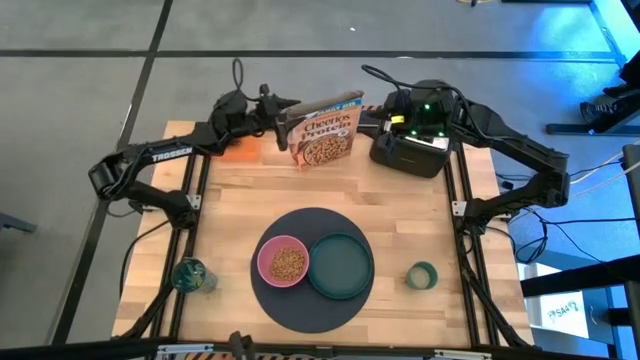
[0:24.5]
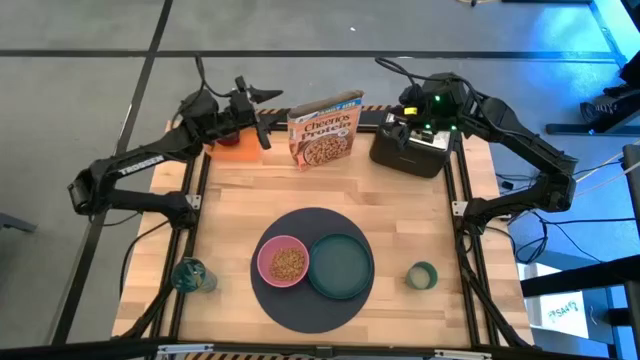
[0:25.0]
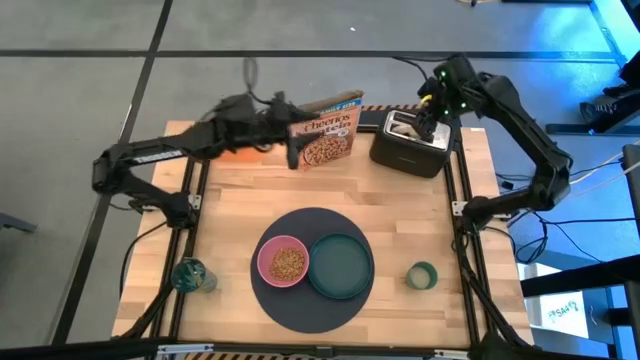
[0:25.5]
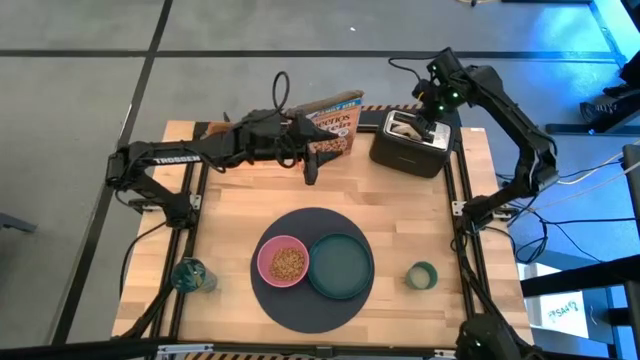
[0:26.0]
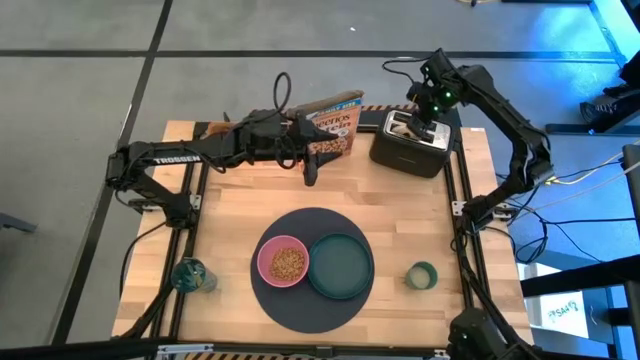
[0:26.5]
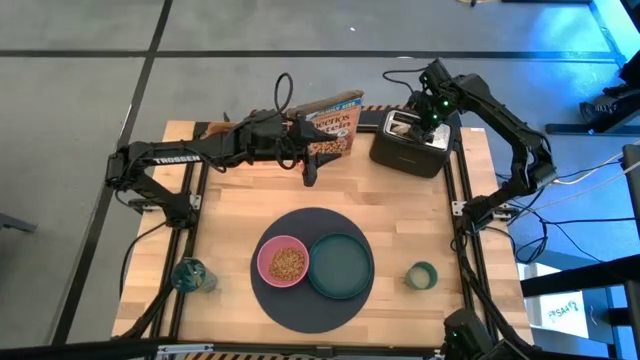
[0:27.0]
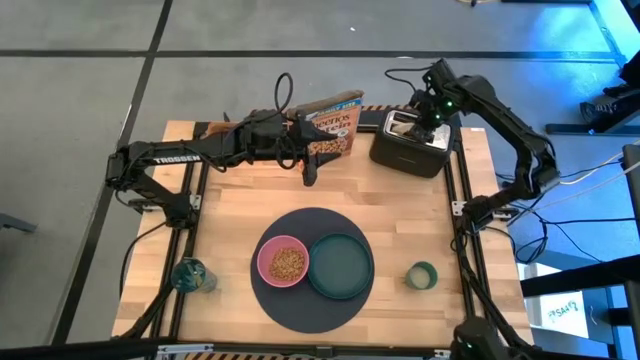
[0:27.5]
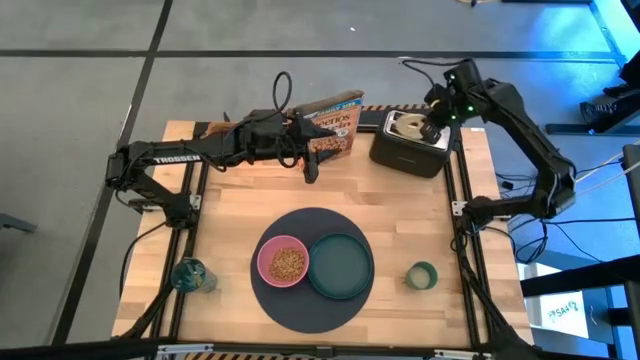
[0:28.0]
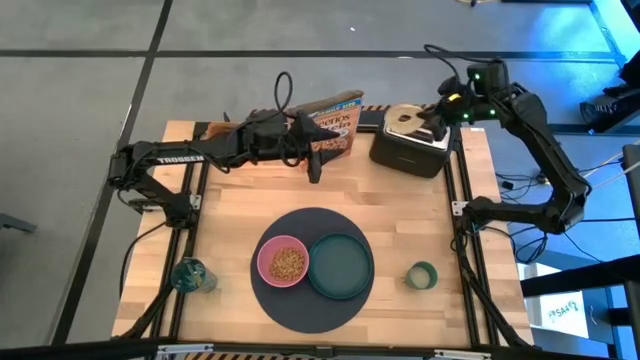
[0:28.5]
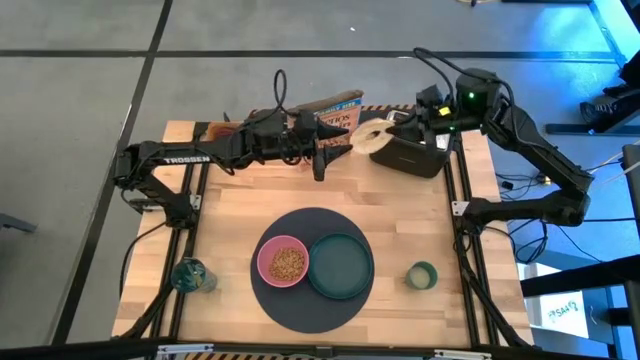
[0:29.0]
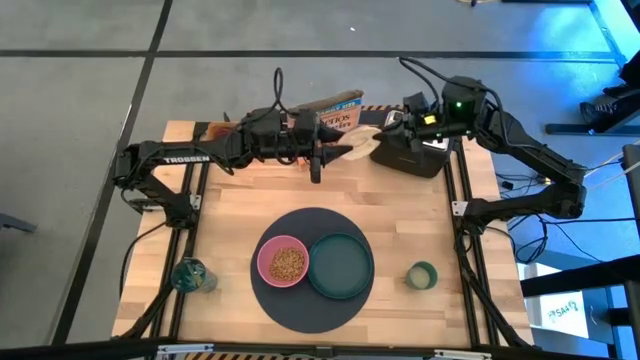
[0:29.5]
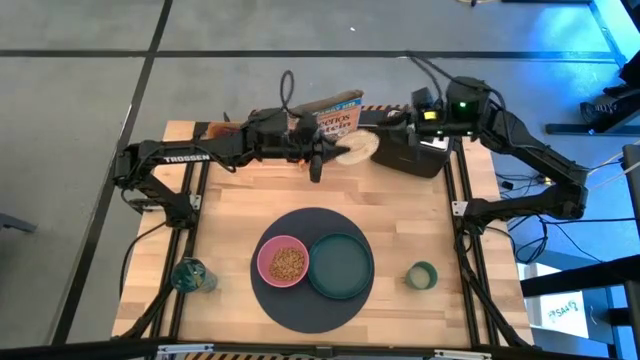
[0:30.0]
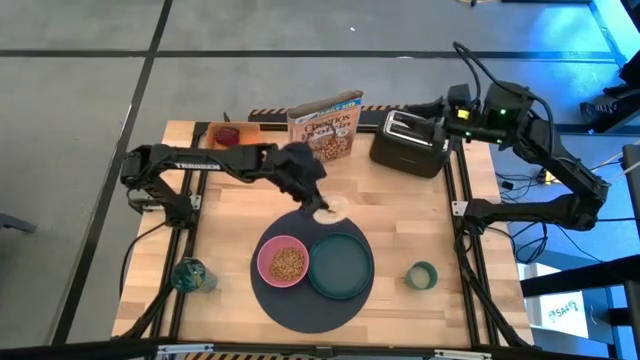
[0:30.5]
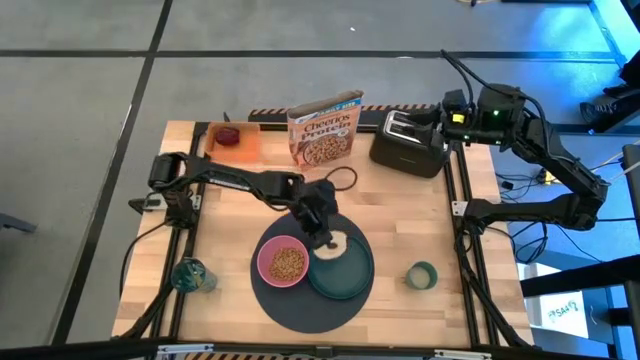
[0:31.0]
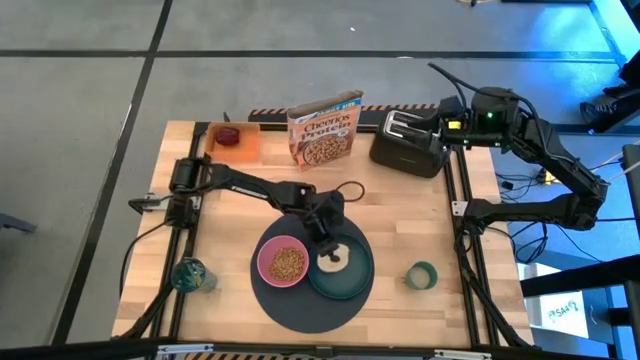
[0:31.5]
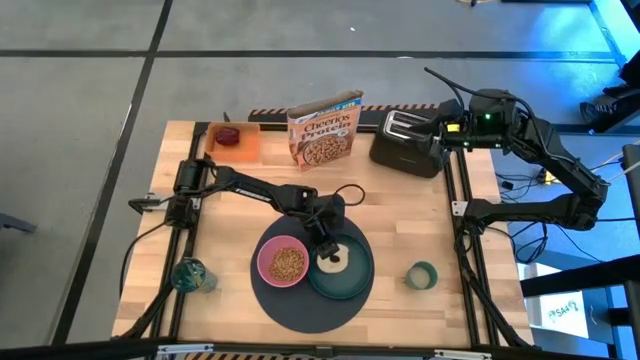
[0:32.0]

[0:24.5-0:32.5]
Task: Arrange a breakfast setting
Put the toasted bagel from the toaster on the green plate

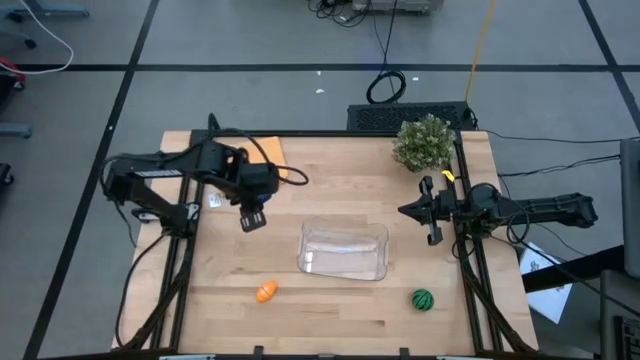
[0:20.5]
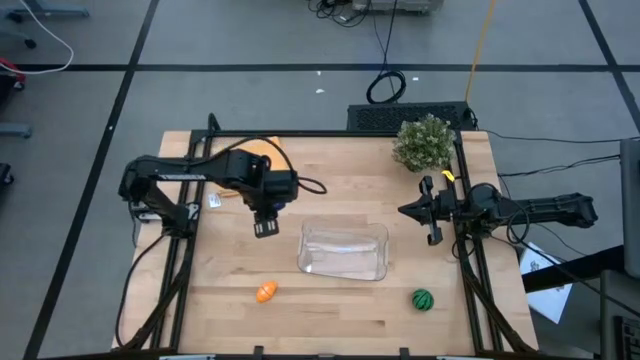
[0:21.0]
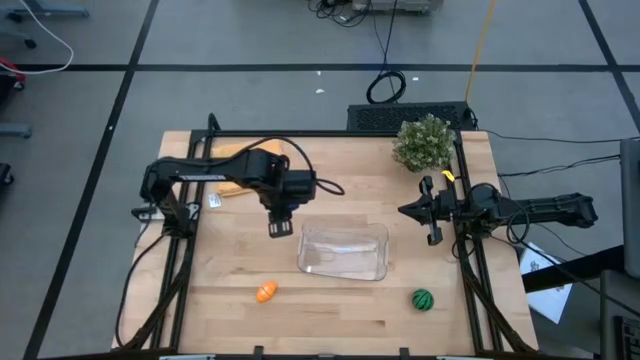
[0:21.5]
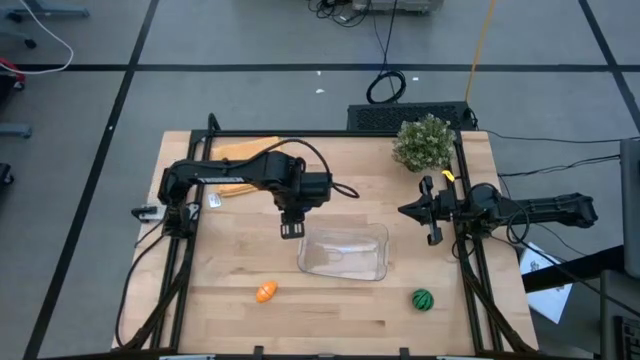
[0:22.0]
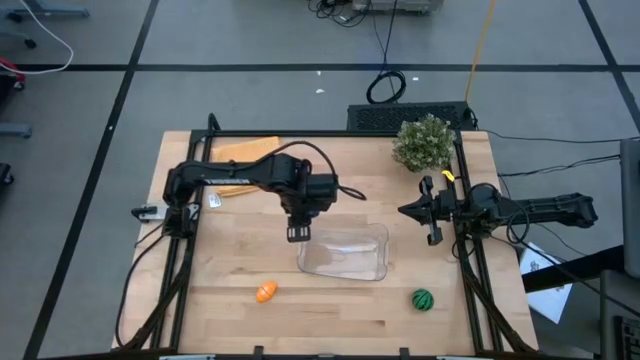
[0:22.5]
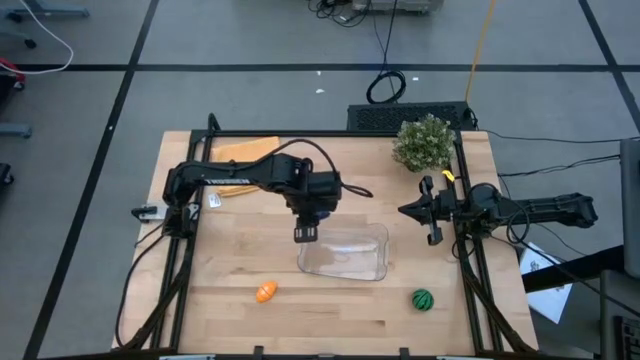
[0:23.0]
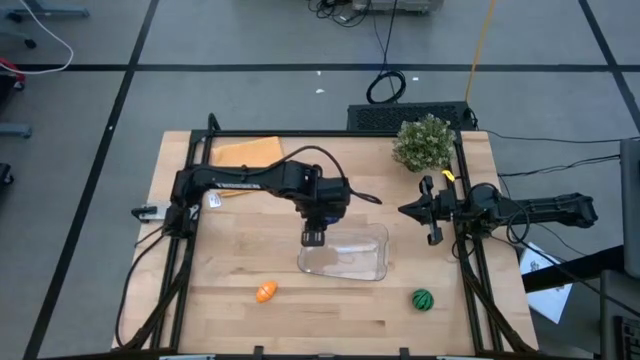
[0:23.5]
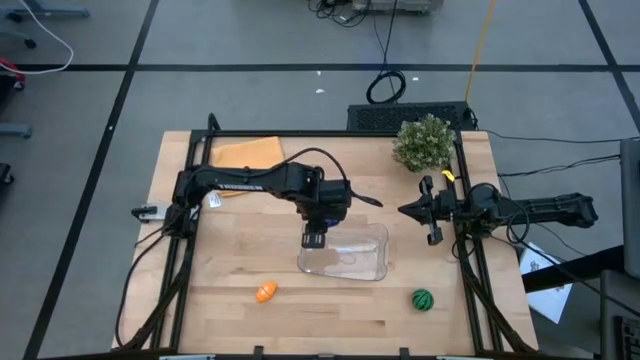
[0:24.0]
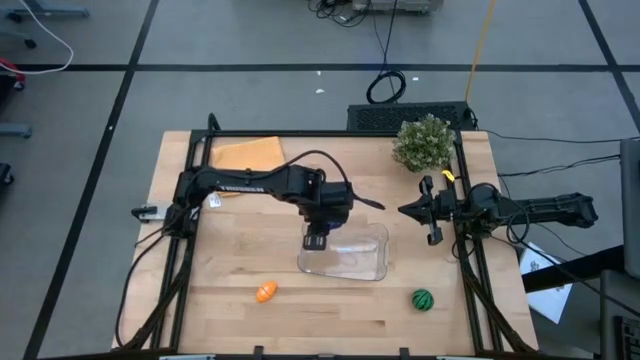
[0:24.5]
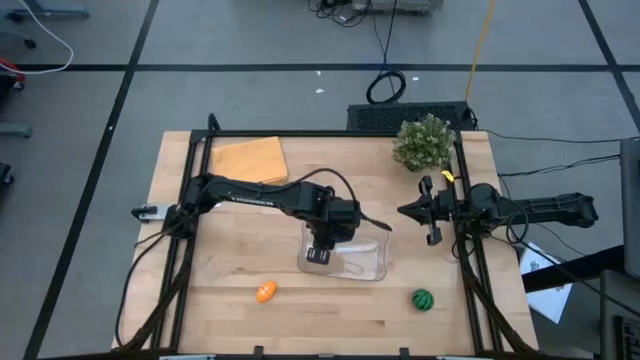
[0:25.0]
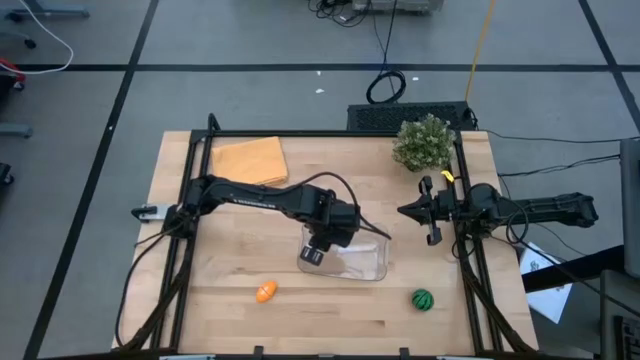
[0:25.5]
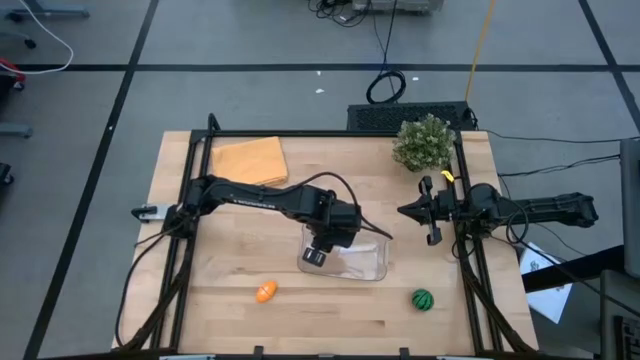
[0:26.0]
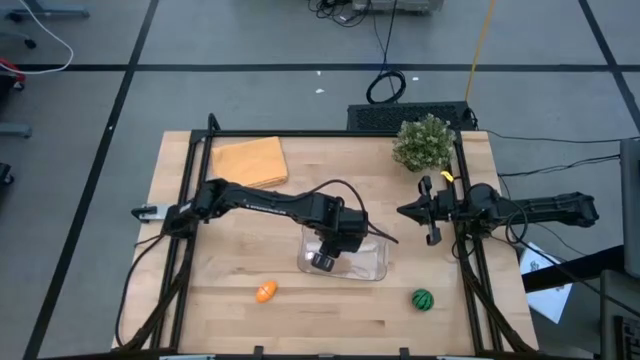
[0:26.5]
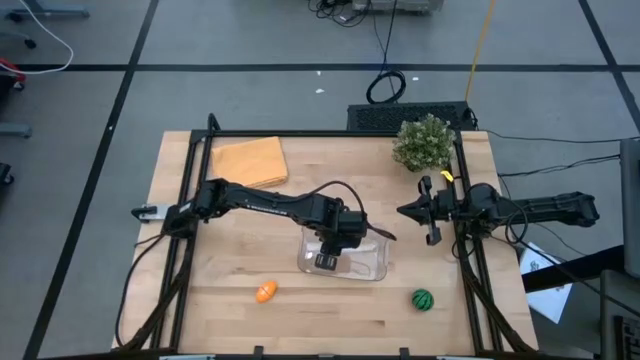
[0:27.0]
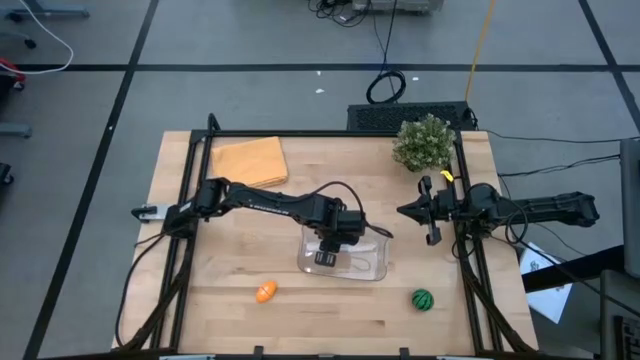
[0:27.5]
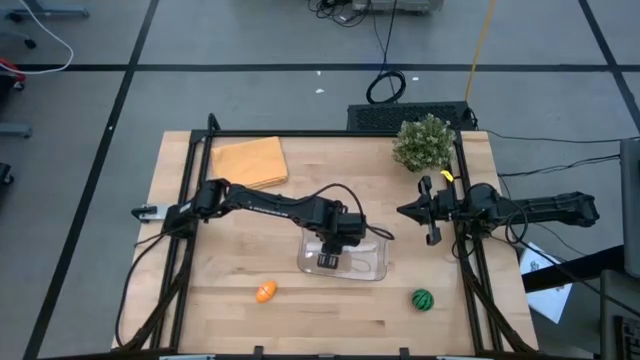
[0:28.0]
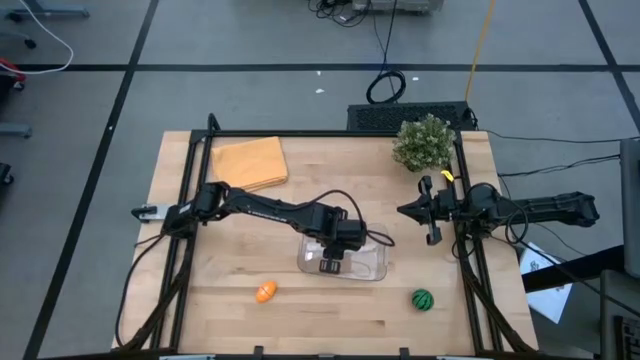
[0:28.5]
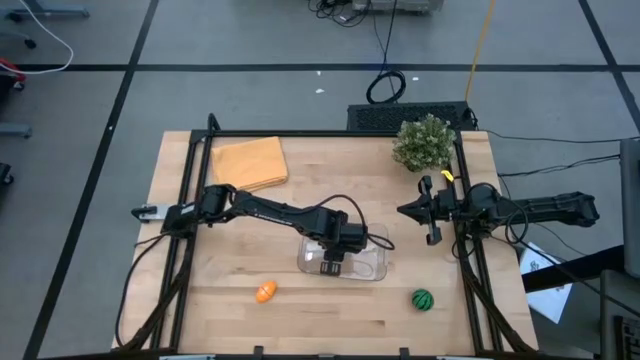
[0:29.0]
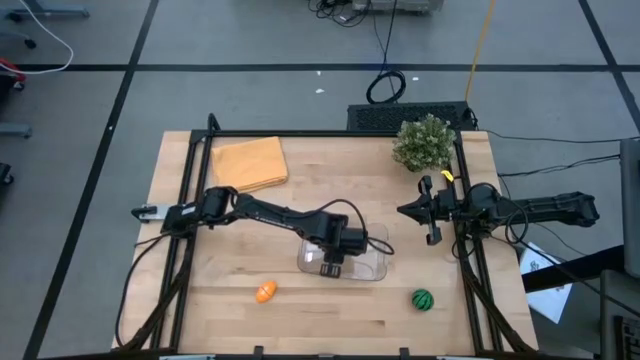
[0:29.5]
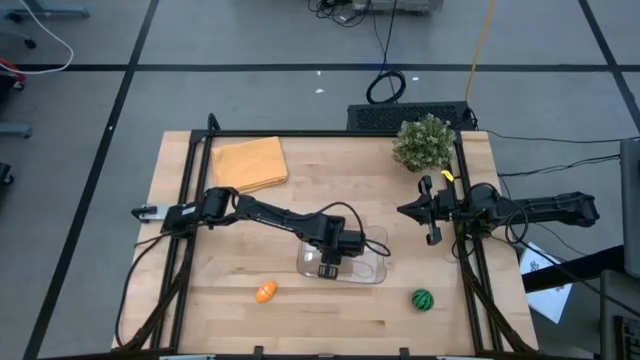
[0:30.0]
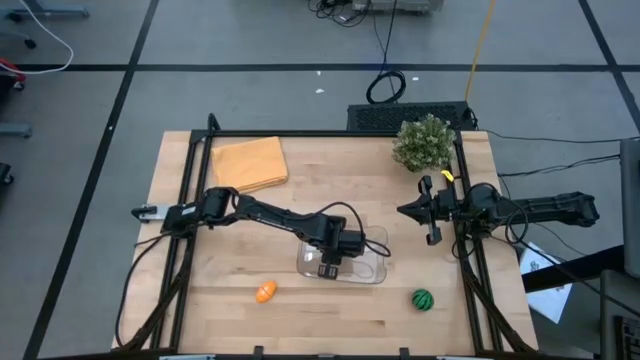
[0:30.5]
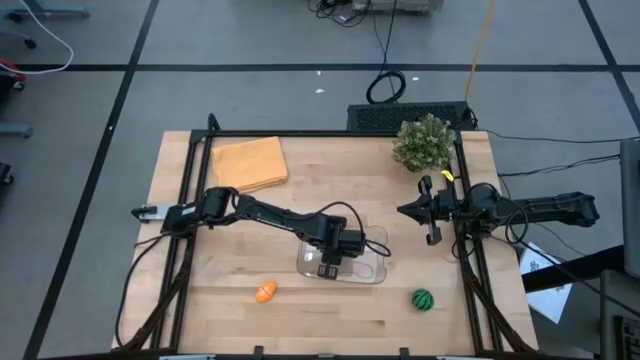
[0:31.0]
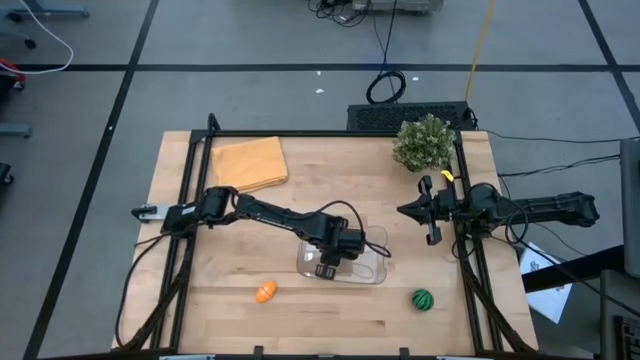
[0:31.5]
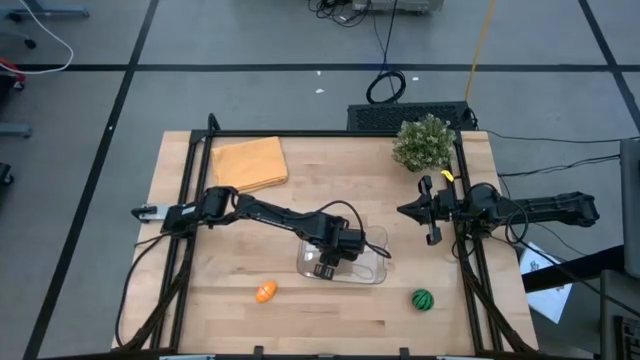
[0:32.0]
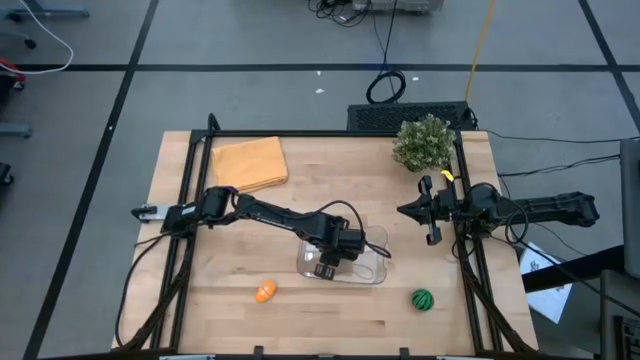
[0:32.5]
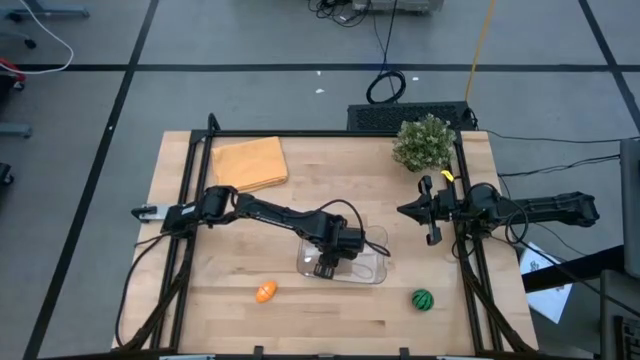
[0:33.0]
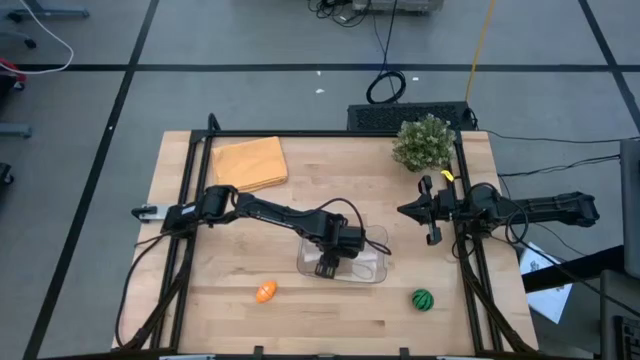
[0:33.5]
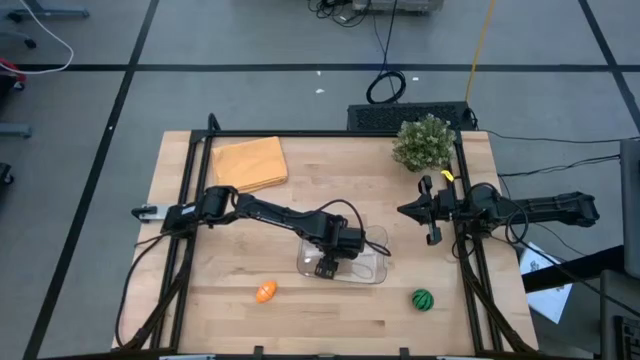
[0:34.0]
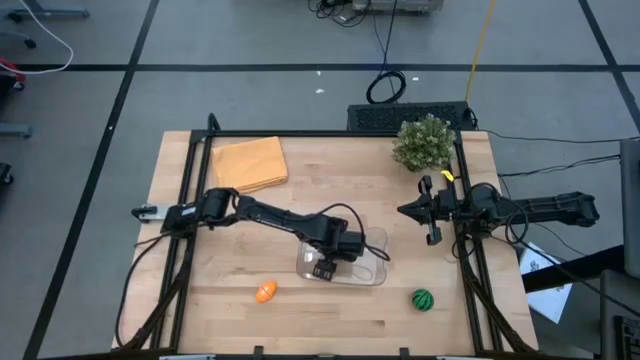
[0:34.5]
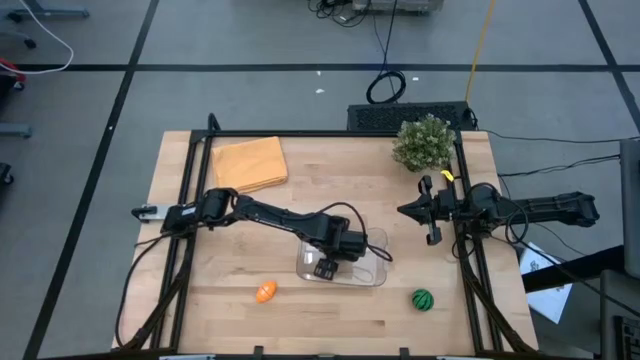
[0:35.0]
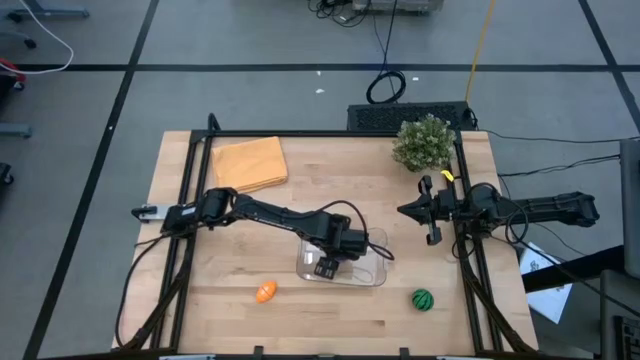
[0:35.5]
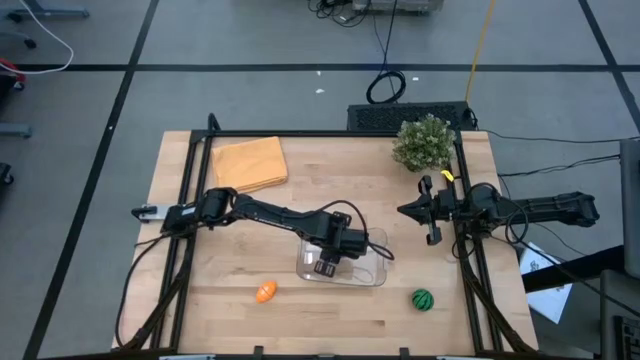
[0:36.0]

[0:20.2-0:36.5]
Task: Pick and placing Produce into tupperware
Put the purple eggplant into the transparent bin
